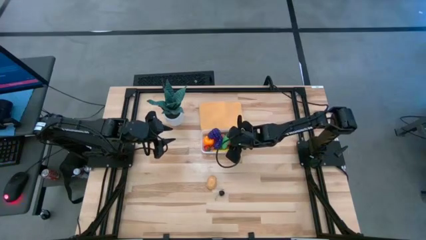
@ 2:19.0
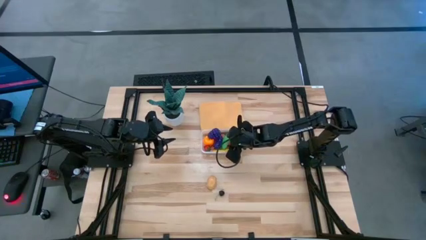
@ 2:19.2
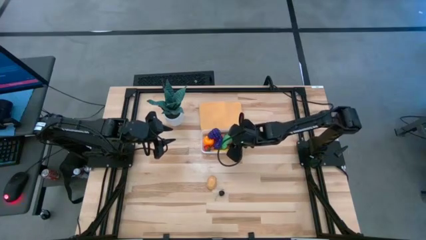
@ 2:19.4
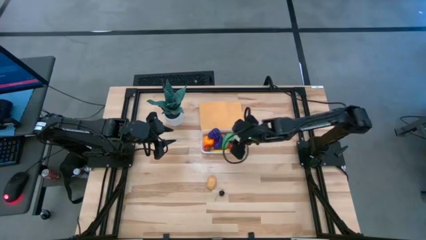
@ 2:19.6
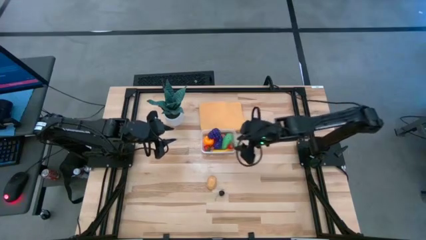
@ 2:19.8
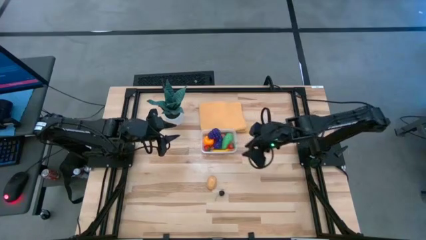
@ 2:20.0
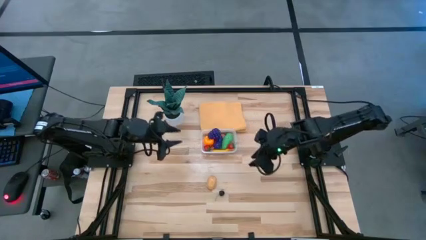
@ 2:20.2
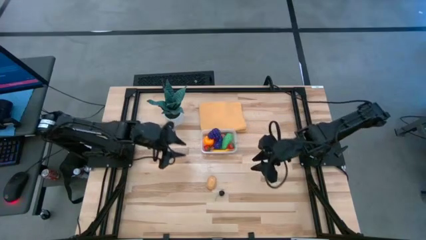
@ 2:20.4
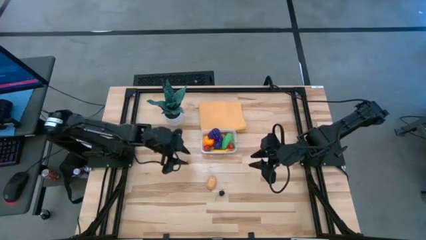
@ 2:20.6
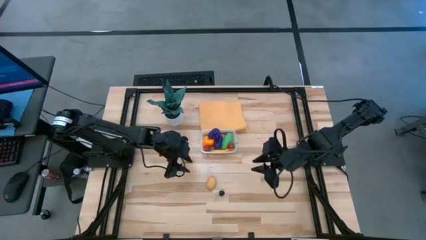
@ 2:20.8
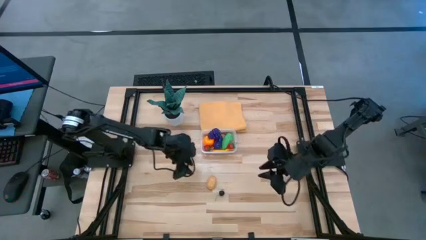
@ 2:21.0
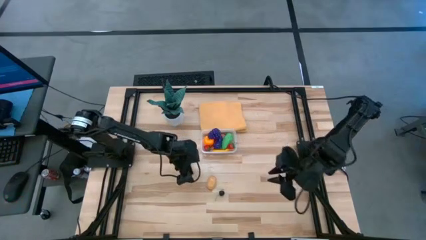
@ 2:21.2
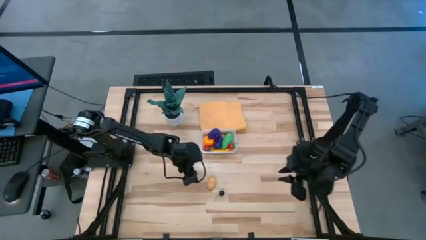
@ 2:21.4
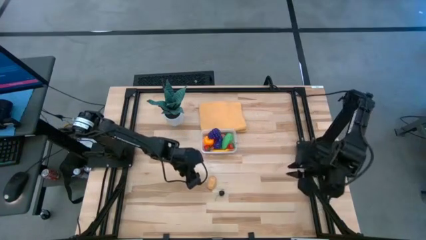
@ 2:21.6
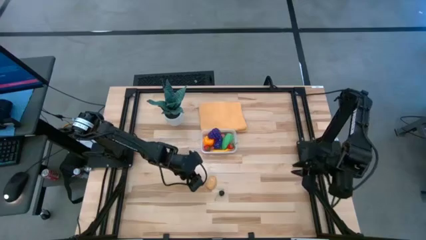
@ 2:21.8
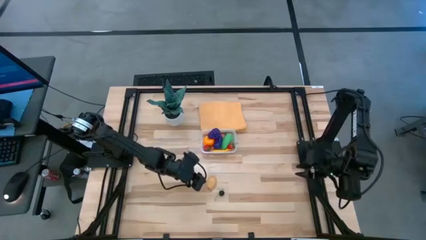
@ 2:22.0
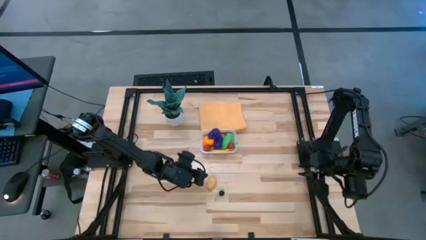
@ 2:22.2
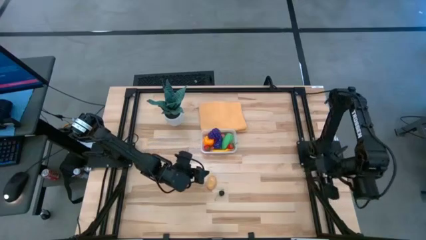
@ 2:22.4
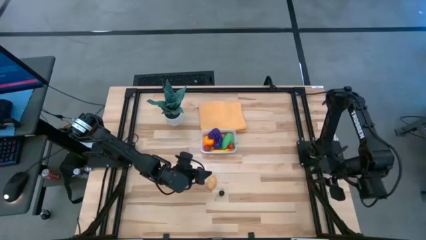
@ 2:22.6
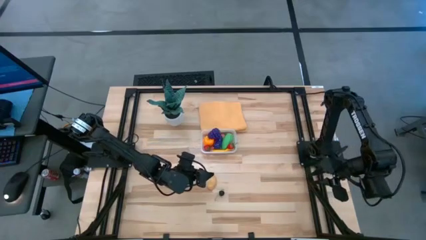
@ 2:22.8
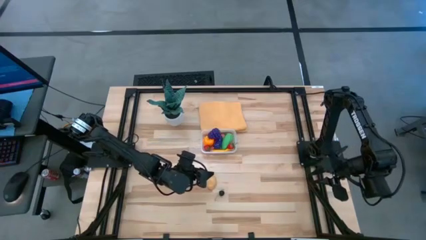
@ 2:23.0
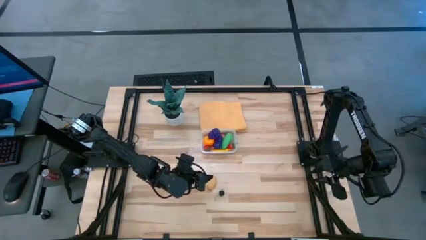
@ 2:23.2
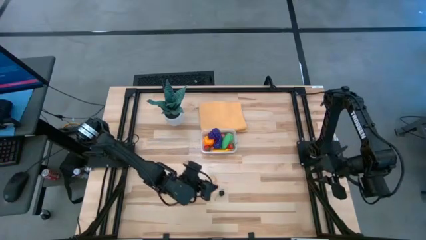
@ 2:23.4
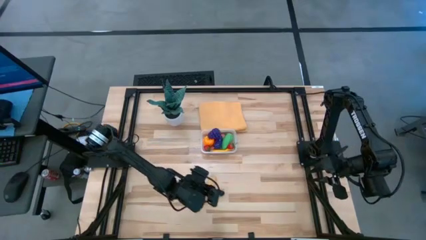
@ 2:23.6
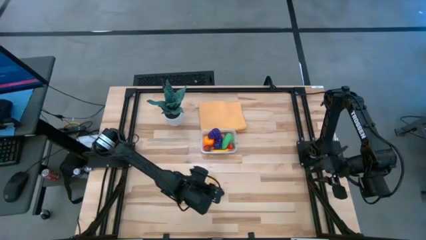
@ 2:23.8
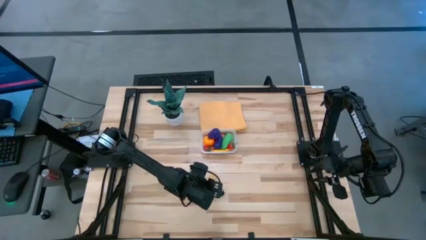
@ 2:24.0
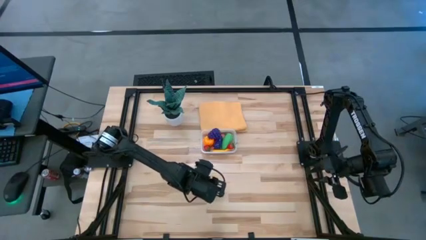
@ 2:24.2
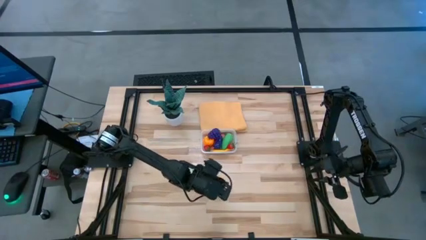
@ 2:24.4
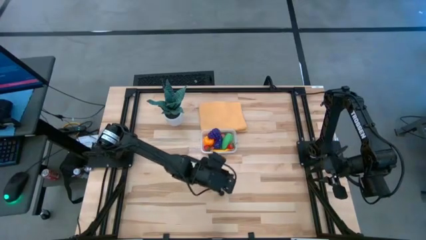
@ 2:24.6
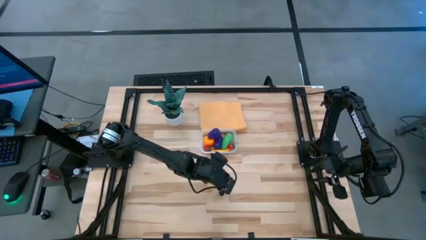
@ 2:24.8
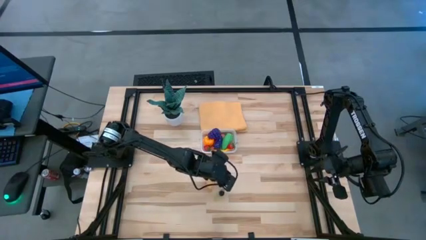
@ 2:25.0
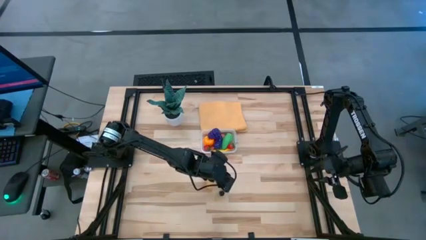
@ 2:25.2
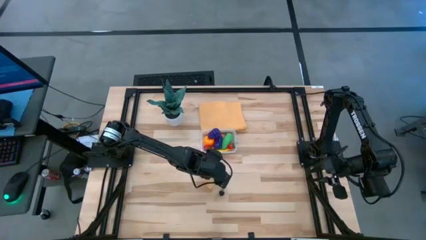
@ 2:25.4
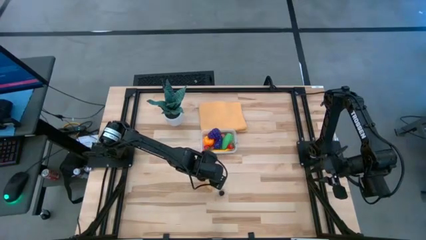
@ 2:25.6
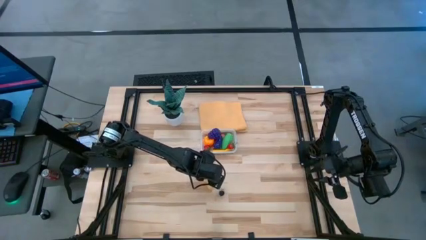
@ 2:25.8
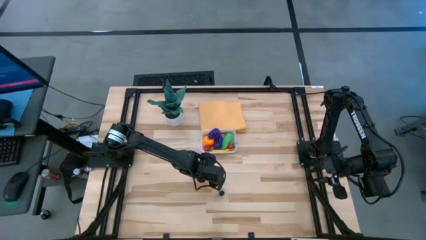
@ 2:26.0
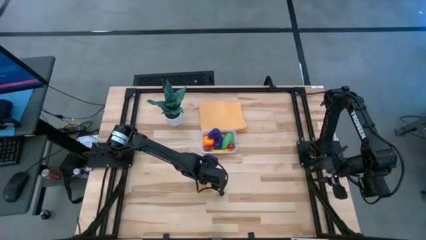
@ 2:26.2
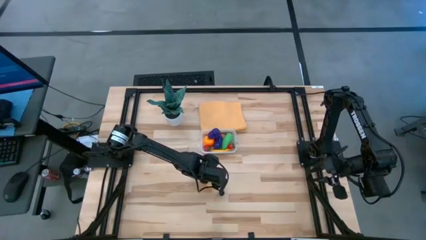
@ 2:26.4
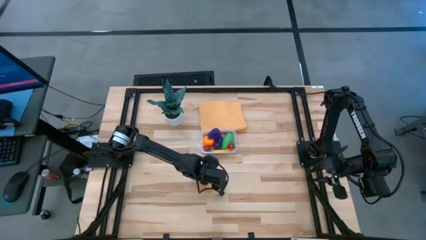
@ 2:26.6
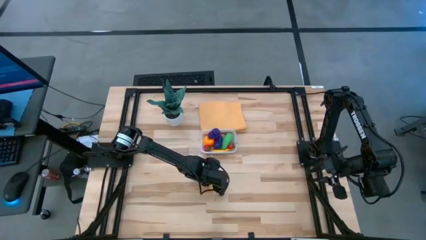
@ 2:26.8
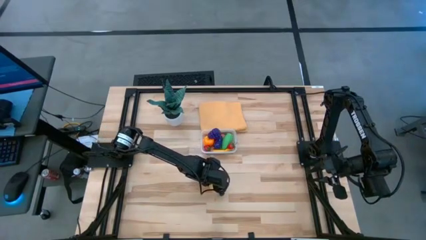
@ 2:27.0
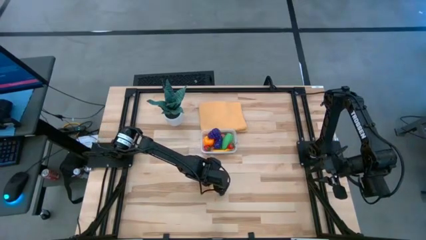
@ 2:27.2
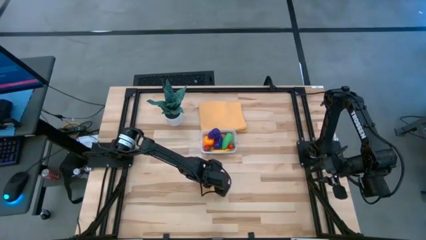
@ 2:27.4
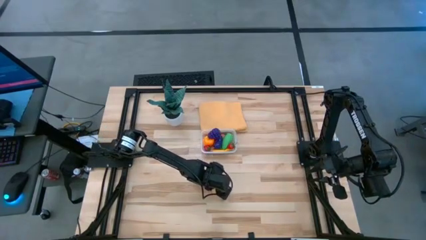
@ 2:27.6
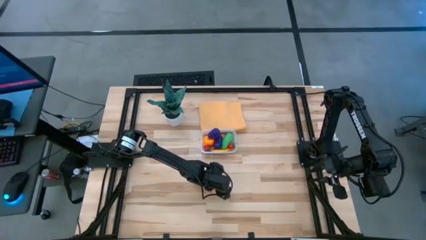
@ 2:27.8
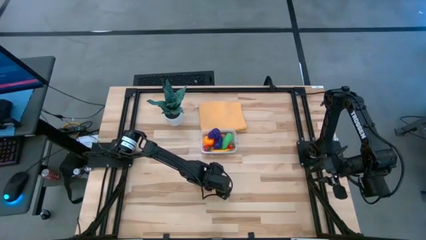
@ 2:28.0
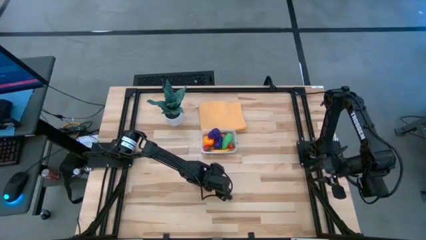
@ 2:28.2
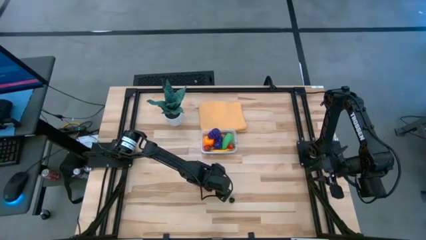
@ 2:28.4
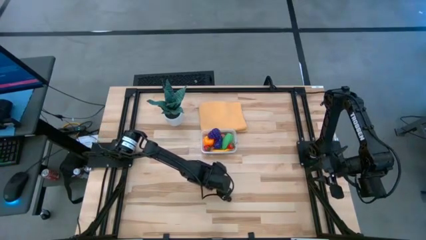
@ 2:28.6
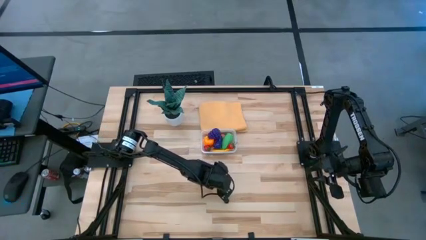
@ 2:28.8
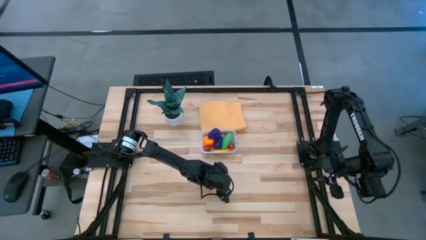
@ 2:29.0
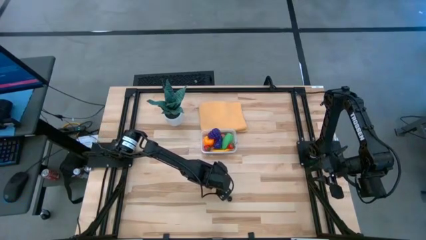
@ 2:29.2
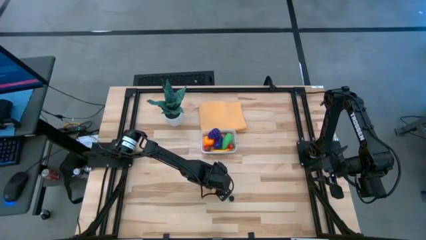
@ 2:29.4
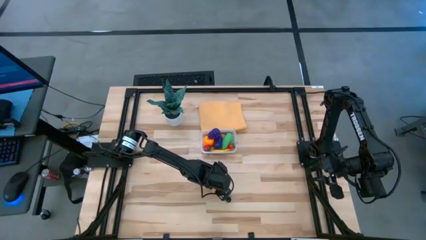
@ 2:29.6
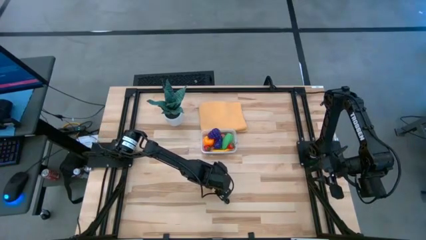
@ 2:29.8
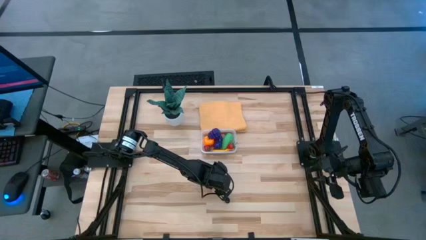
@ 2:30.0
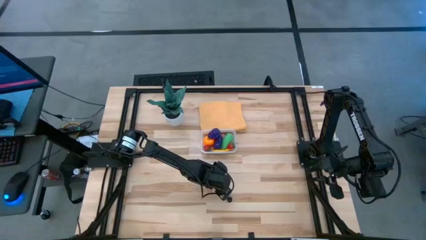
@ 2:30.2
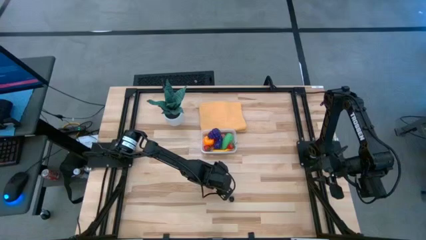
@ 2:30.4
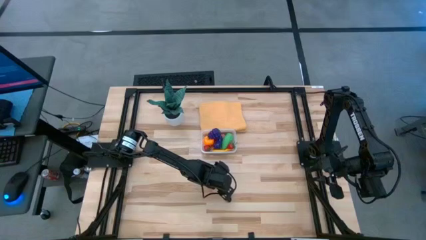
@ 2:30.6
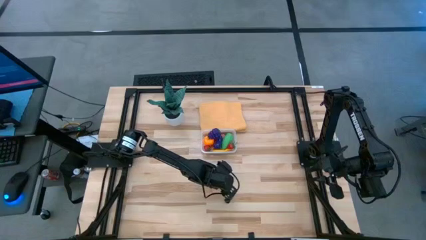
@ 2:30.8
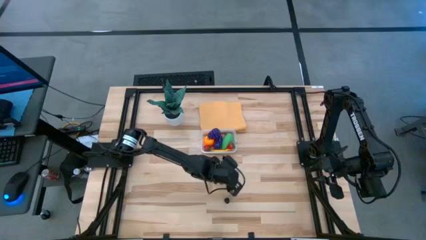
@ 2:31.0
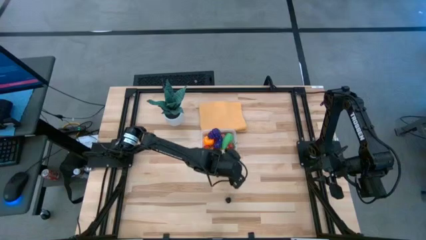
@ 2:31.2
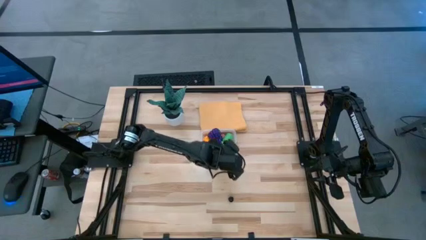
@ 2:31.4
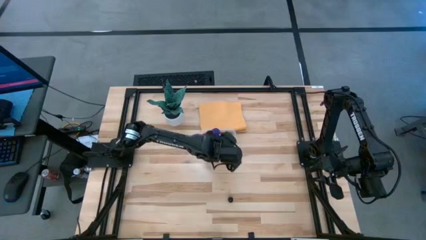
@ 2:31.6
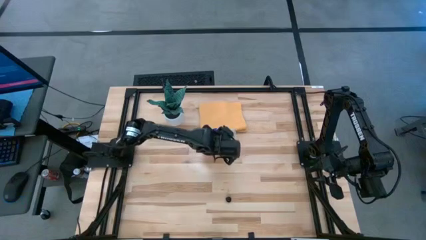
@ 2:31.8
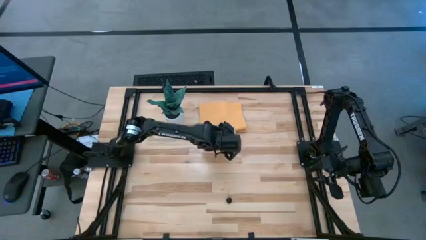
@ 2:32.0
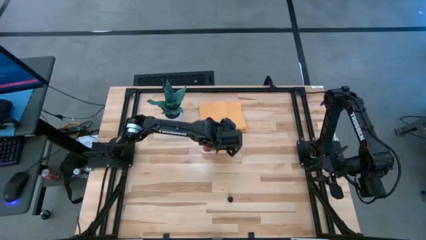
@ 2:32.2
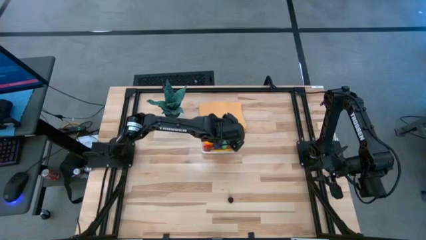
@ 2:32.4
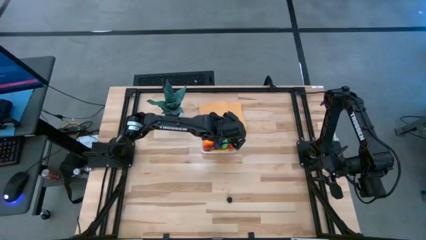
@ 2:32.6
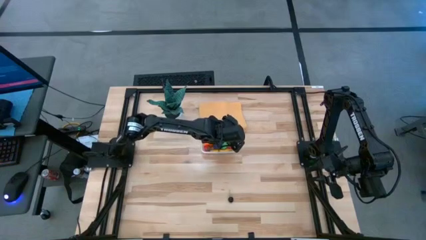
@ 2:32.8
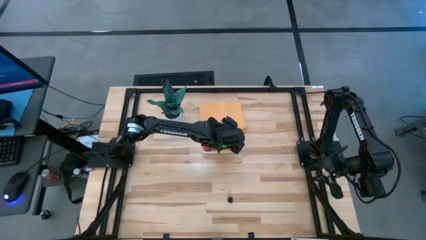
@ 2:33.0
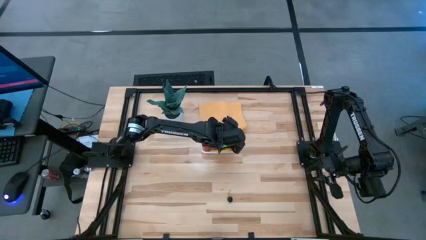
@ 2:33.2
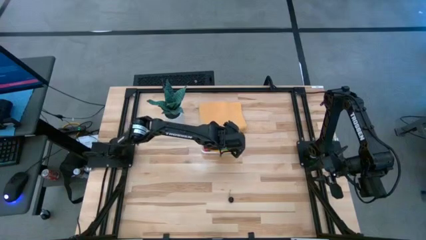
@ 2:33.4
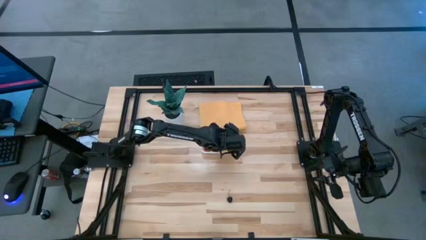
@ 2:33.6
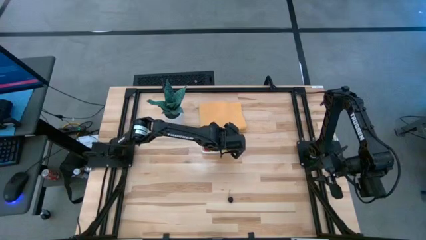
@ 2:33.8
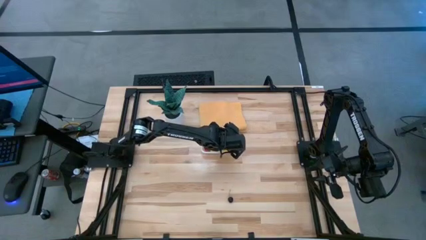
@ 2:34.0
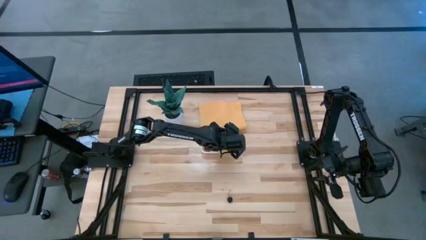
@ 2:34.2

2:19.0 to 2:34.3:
Task: Pick and placing Produce into tupperware
Put the brown potato into the transparent bin

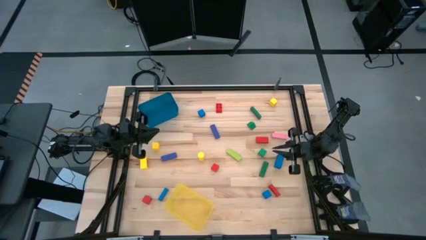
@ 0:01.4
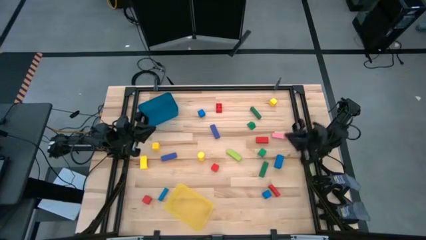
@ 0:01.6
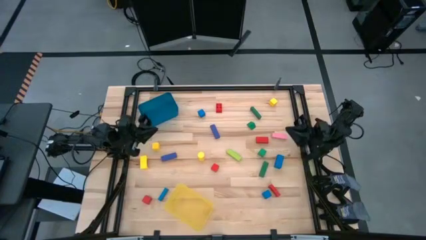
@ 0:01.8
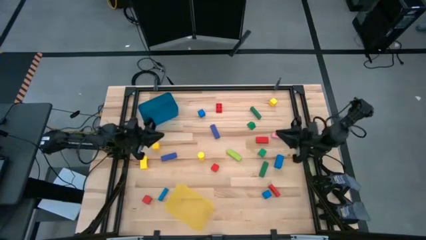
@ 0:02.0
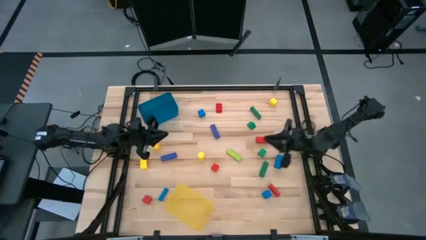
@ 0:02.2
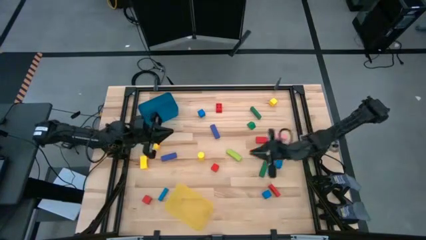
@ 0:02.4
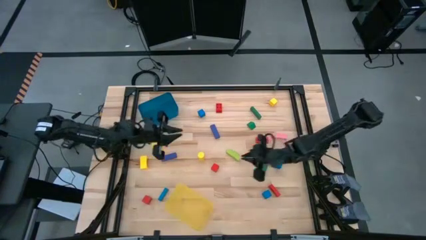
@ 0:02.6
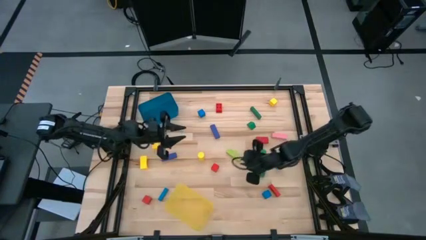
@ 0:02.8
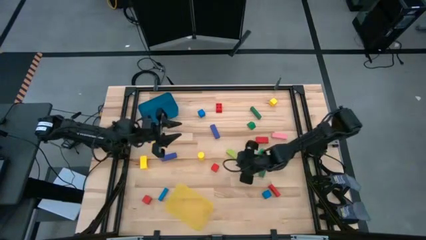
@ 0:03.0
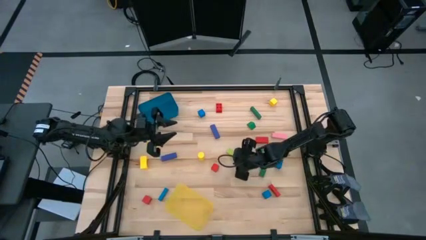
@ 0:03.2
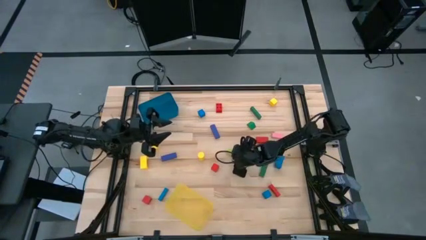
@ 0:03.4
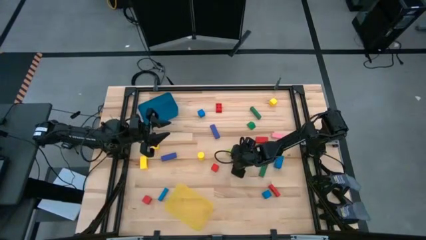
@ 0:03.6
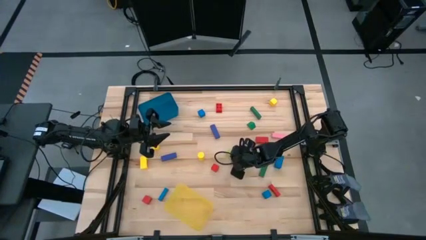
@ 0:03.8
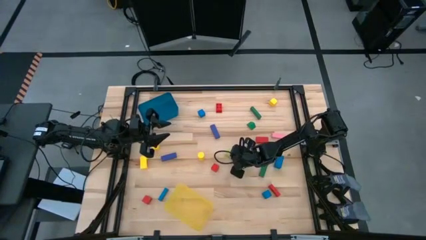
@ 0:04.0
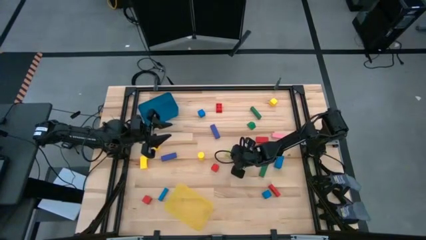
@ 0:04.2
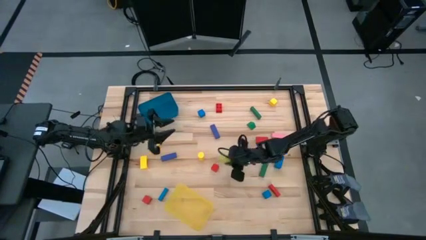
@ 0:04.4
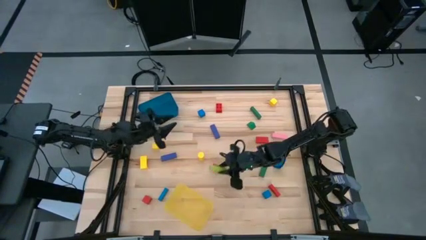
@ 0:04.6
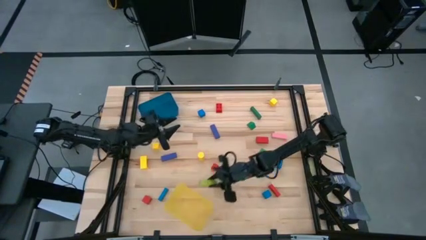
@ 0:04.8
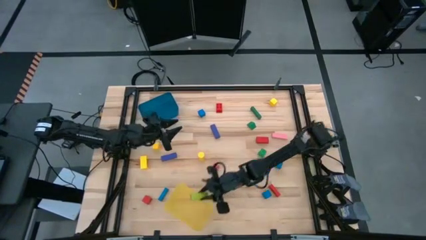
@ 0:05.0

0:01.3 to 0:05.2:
Task: Sort blocks by size
Put the large light green block into the yellow bin
